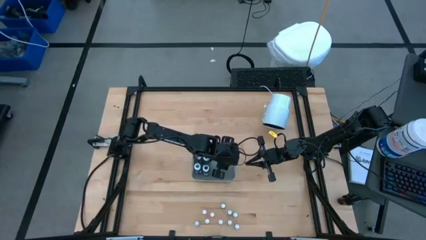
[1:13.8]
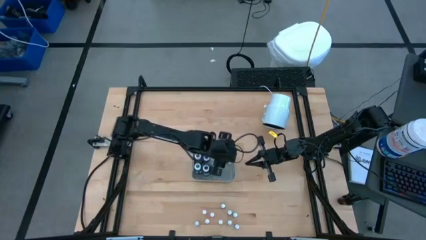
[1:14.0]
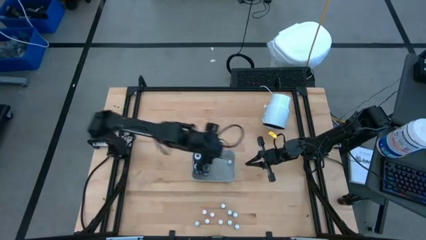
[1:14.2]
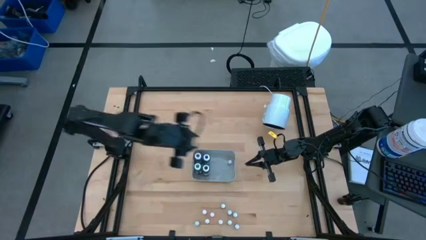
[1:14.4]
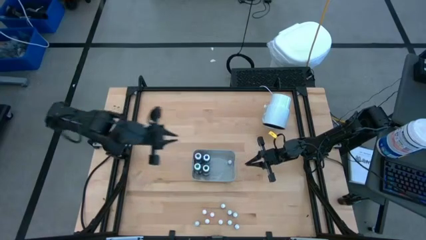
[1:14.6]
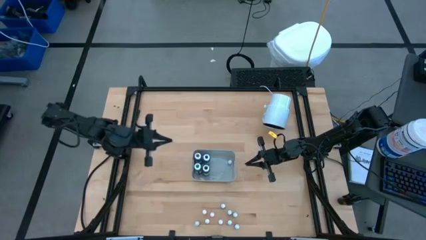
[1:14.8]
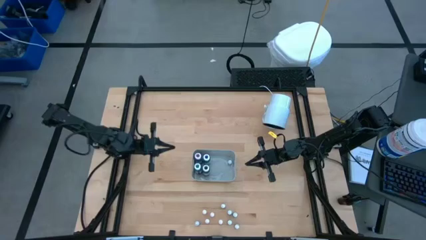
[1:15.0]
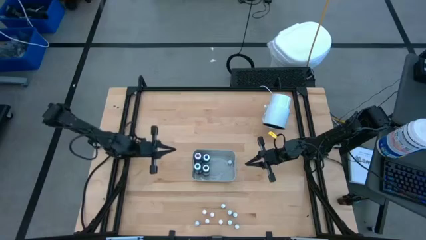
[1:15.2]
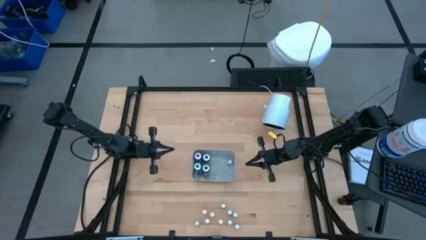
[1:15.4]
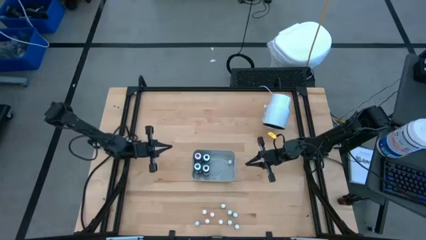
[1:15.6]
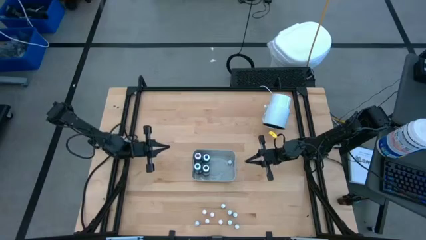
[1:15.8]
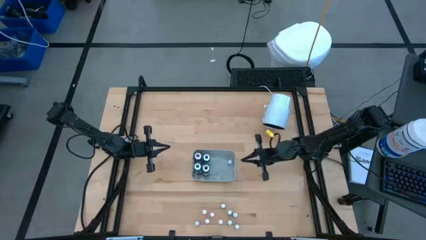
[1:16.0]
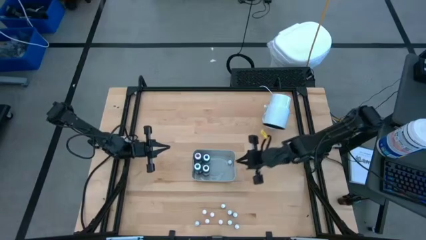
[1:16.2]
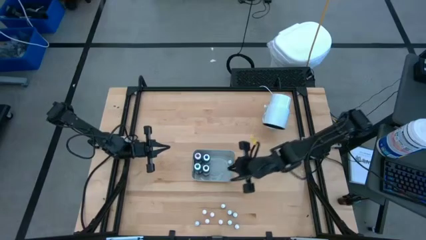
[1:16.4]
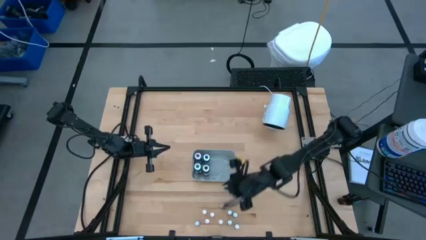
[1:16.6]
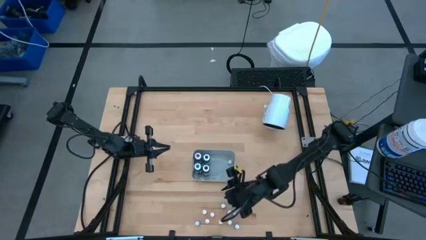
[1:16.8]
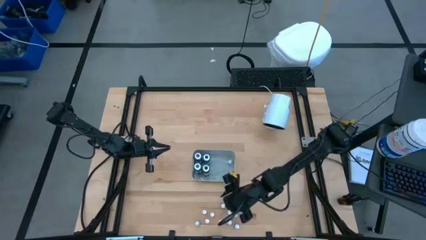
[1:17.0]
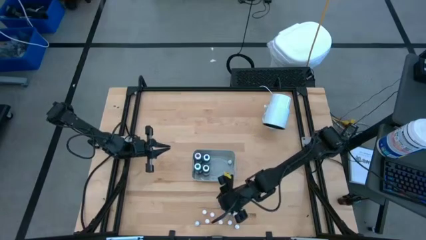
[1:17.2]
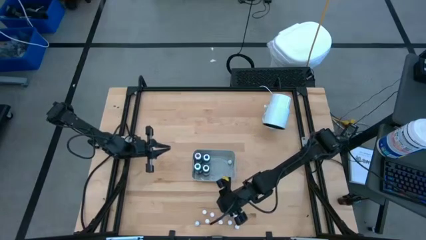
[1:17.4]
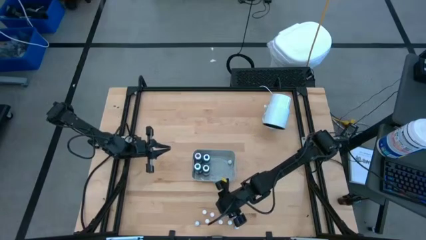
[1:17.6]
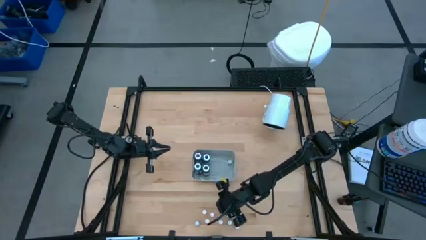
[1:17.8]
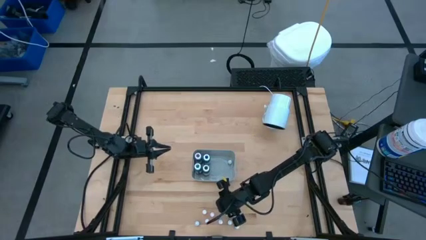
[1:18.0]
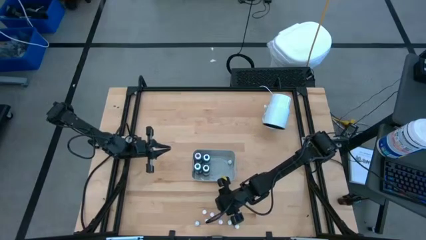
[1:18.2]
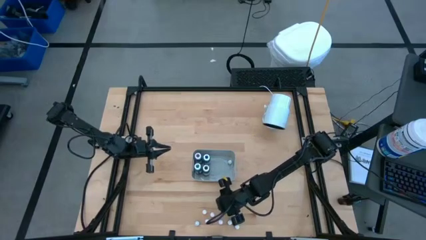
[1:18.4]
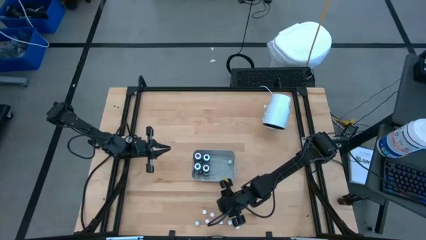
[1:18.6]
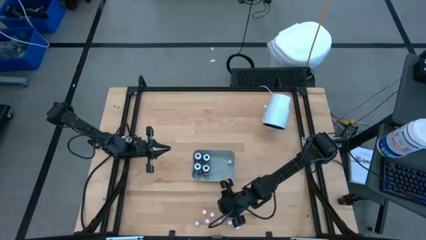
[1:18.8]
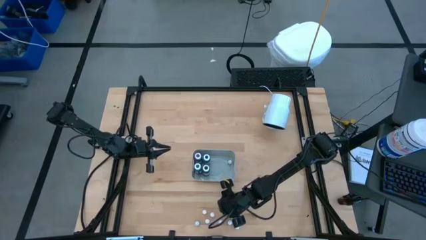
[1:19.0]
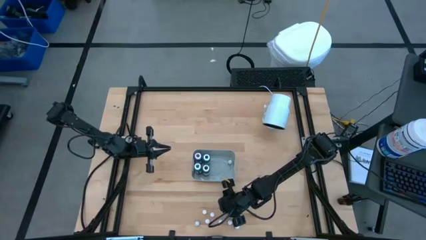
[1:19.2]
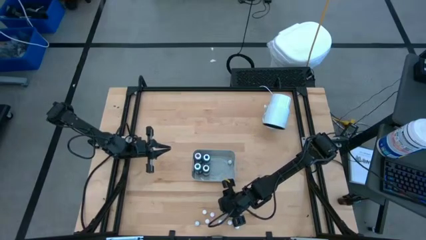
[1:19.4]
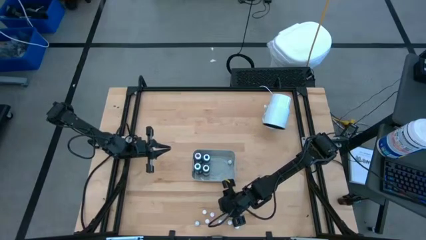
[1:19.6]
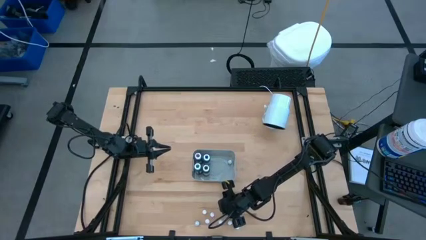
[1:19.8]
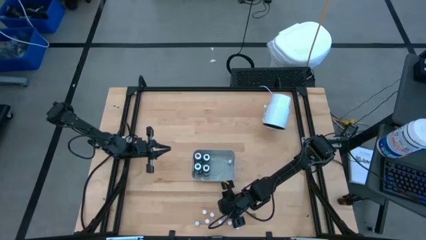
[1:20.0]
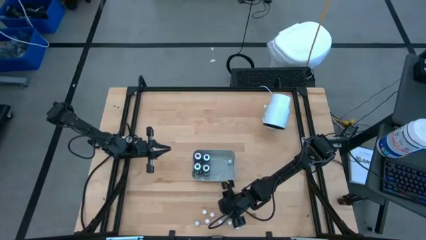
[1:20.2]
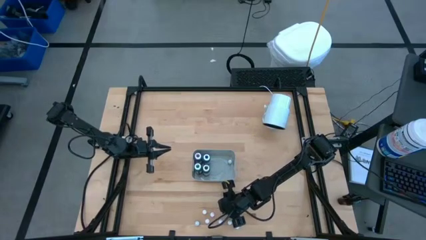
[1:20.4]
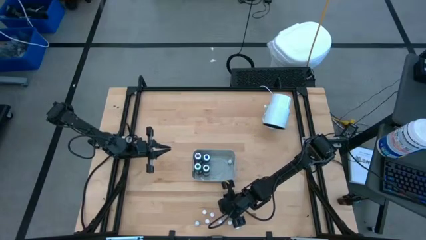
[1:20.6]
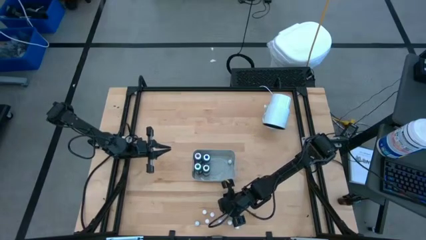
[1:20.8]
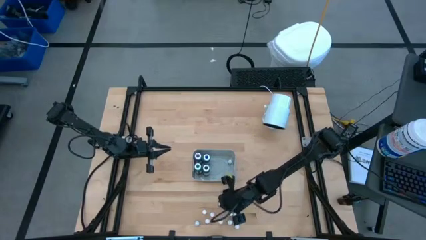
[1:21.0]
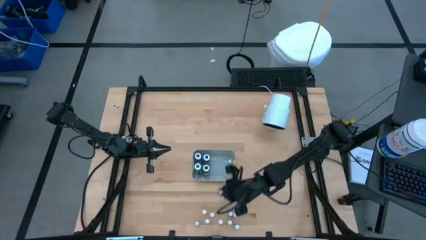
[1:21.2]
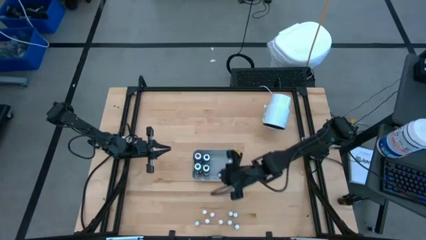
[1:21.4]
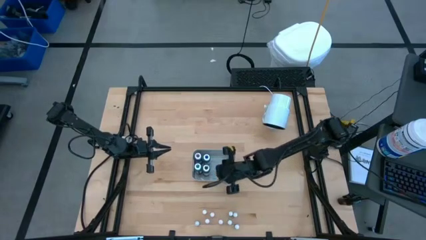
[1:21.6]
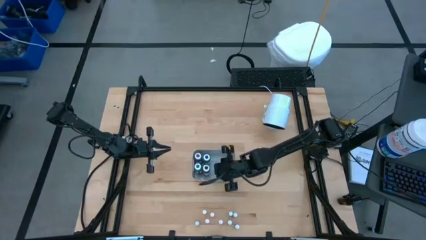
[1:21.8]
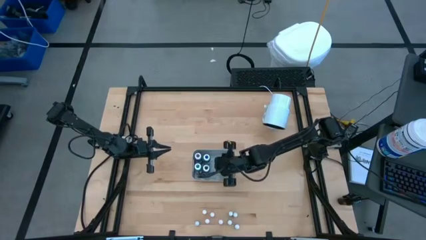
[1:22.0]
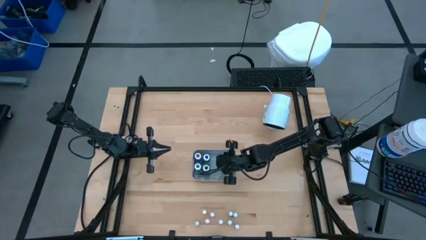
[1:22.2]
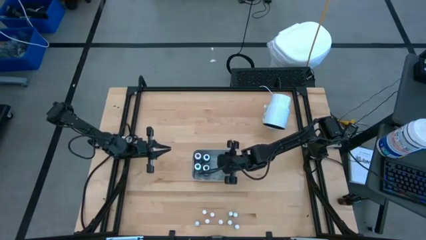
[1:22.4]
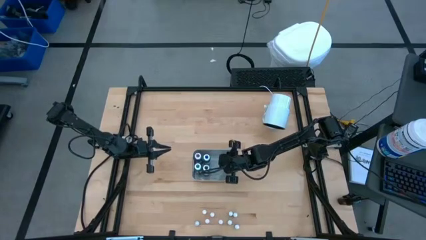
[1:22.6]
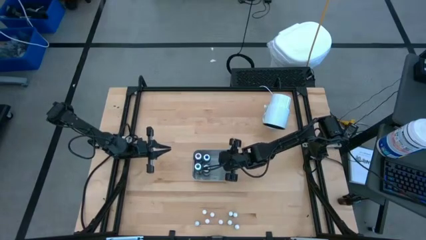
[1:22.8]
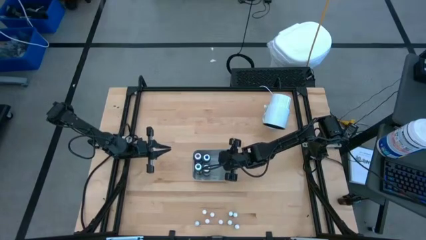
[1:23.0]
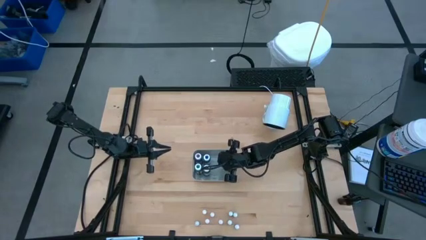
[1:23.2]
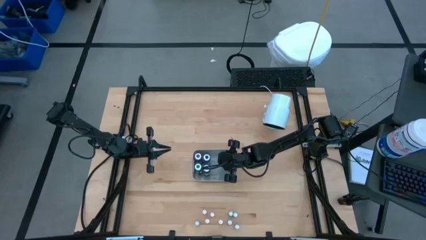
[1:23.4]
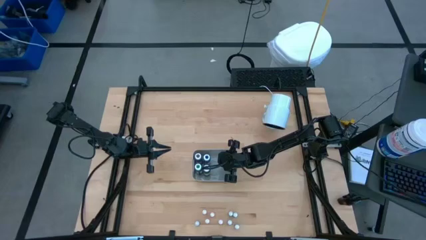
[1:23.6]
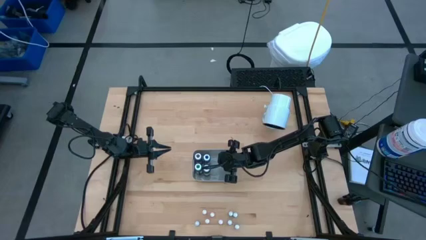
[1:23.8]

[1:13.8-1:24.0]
Task: Pick & Place food coloring
Put the small black food coloring bottle into the gray bin

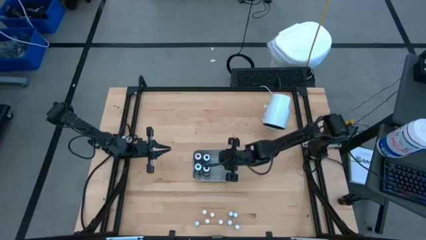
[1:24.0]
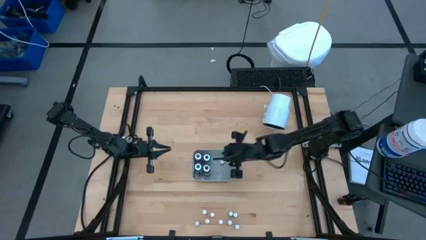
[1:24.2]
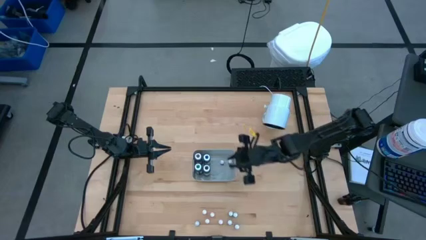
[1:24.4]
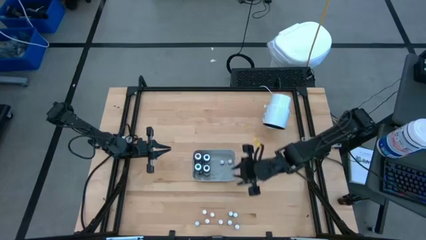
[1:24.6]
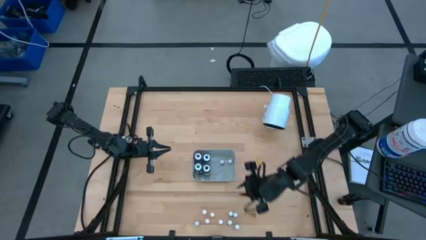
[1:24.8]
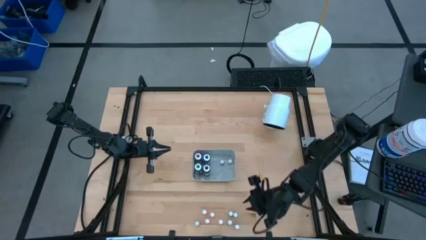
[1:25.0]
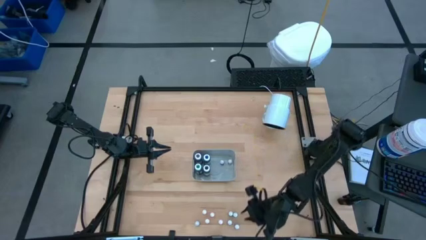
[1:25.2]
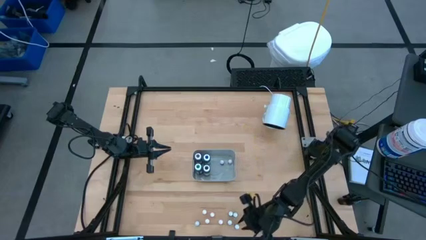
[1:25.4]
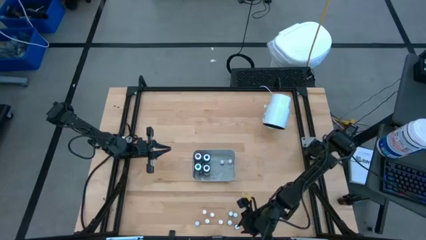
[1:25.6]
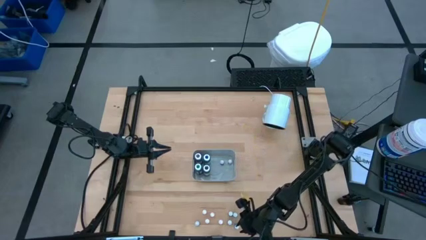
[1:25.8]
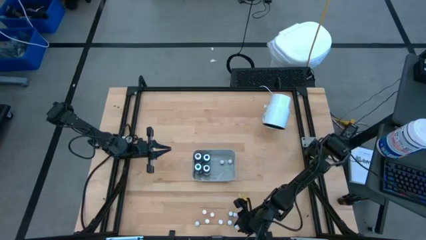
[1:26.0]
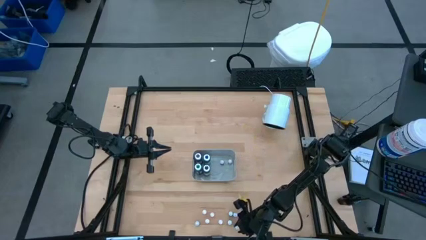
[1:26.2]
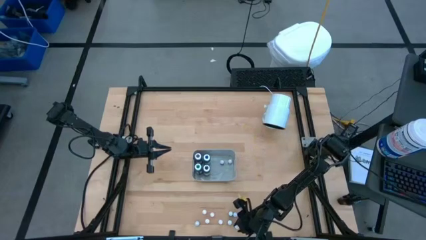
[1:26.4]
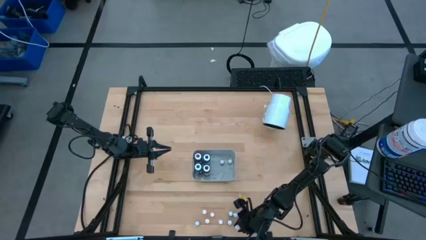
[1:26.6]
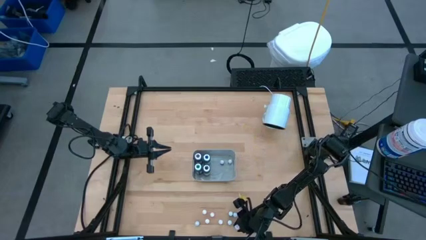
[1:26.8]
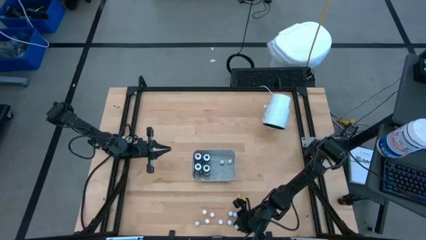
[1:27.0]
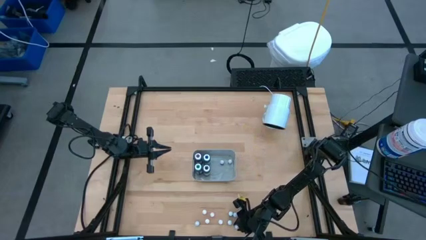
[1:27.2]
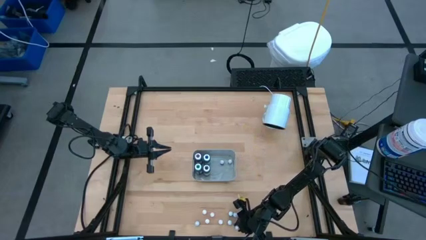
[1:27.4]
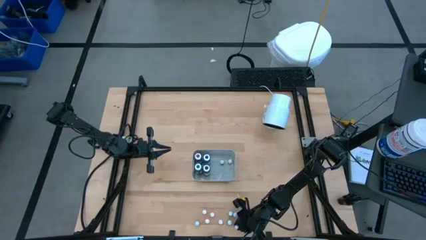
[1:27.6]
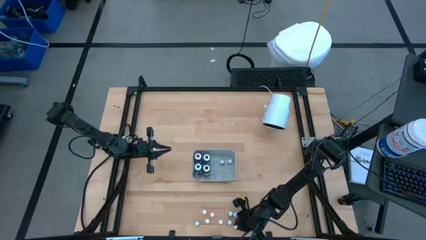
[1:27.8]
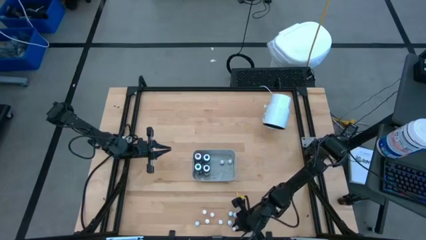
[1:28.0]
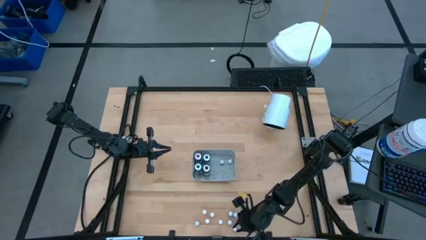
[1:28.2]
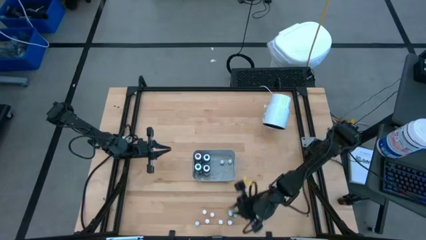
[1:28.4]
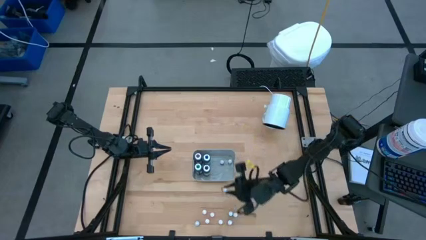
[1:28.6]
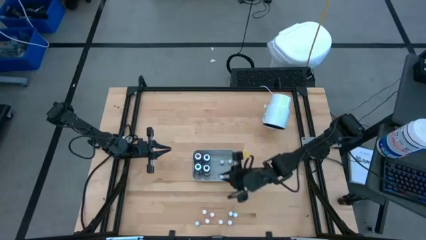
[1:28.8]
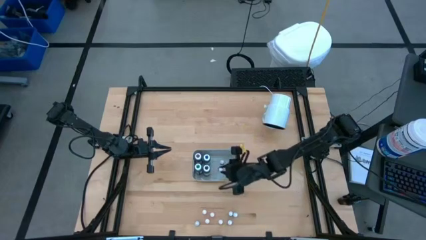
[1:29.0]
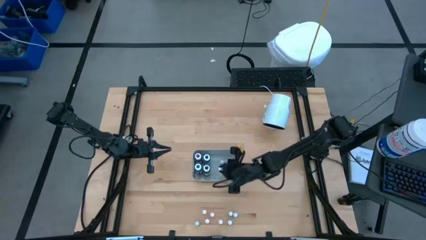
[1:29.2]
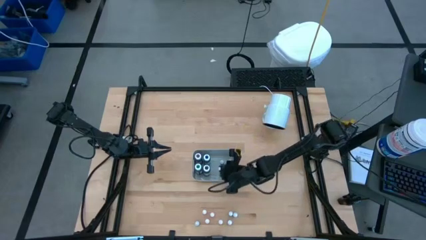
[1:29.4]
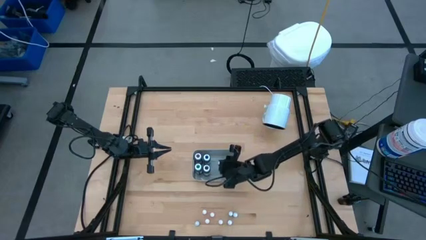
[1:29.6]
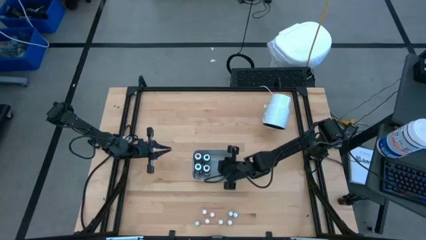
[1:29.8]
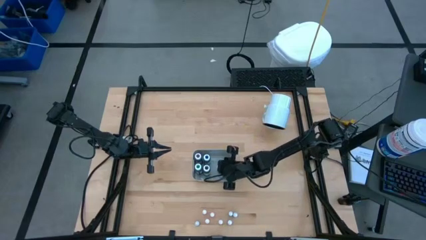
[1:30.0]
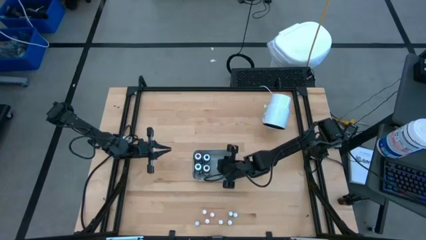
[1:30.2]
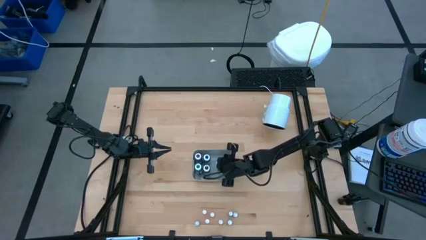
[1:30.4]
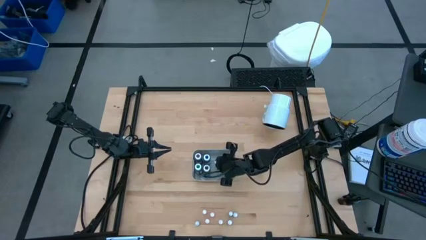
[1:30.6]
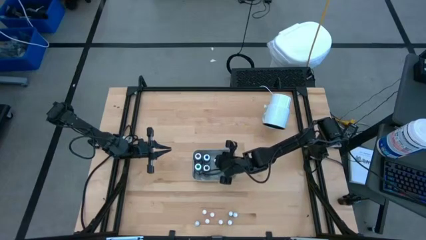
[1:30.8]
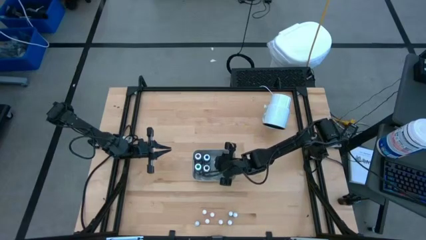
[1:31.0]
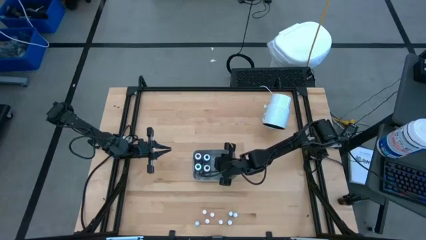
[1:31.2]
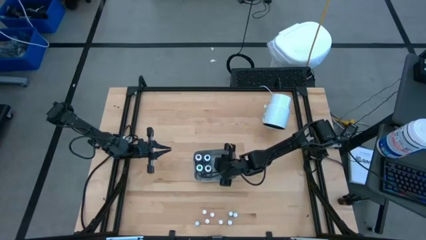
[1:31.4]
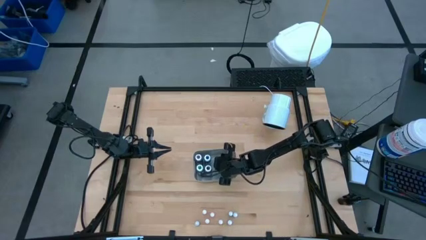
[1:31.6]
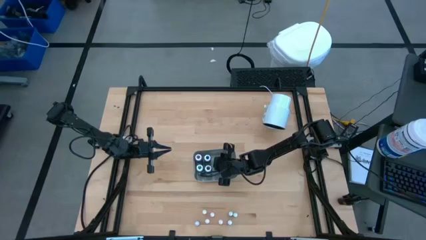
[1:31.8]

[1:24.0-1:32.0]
Put the small red food coloring bottle into the gray bin
